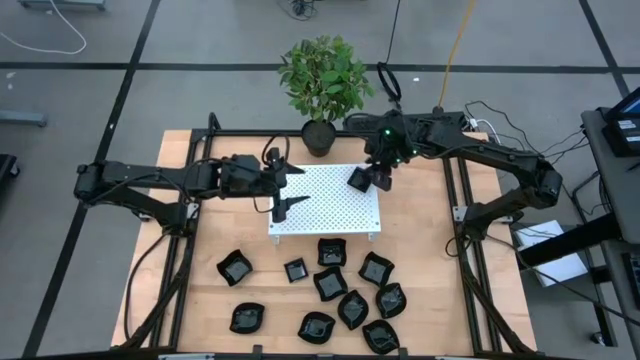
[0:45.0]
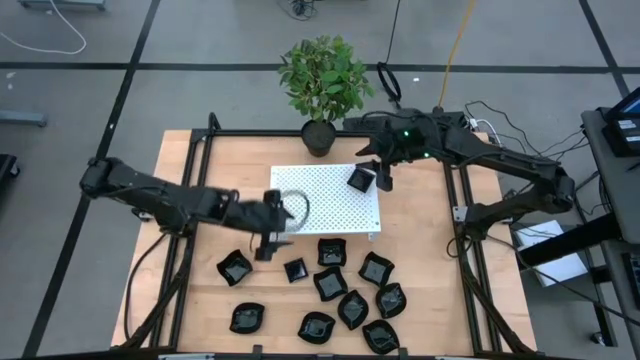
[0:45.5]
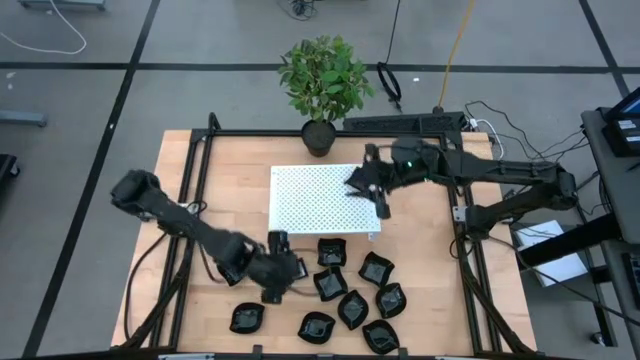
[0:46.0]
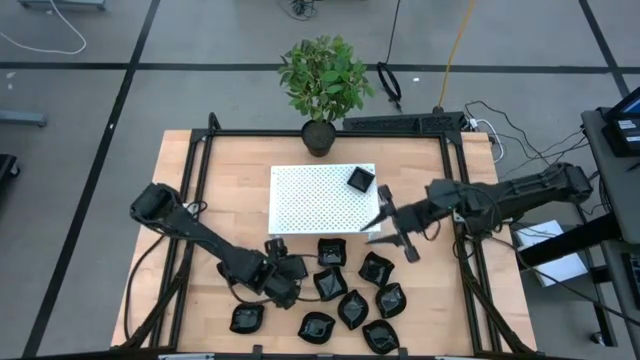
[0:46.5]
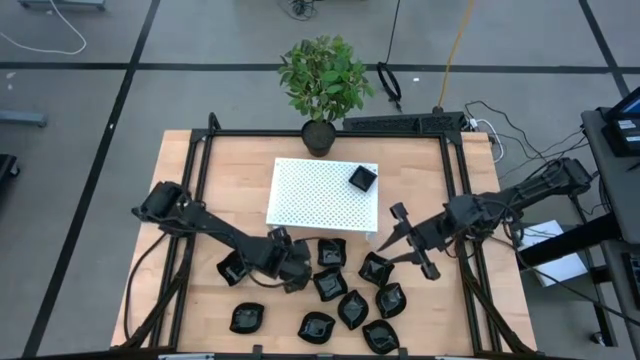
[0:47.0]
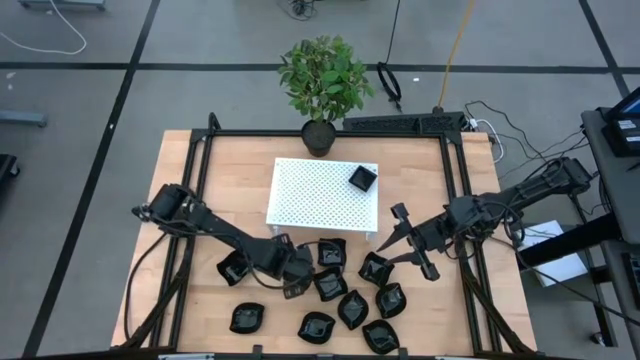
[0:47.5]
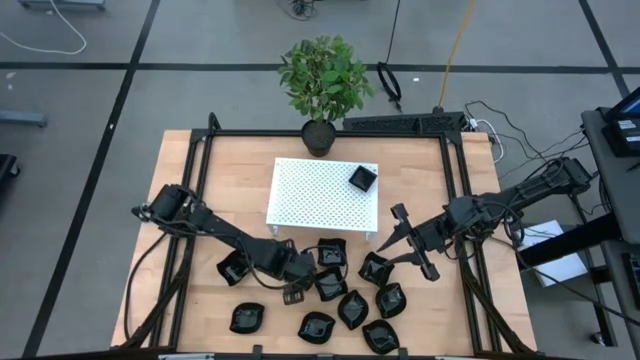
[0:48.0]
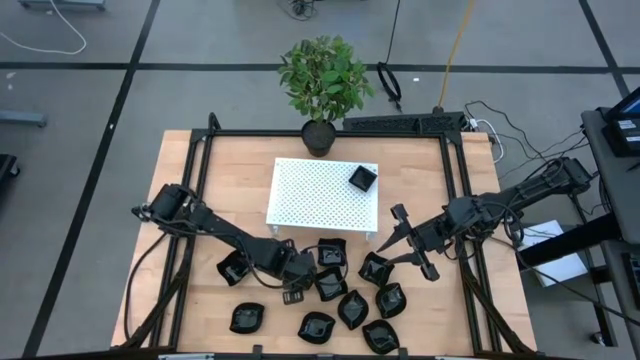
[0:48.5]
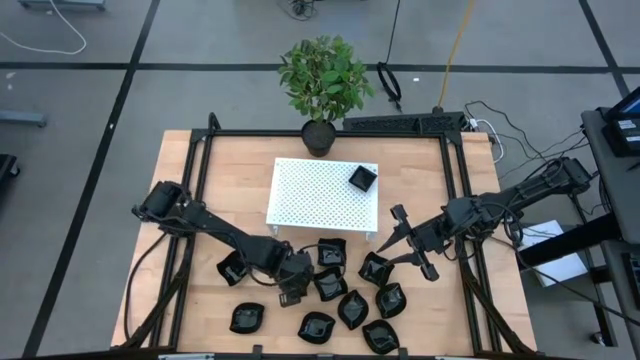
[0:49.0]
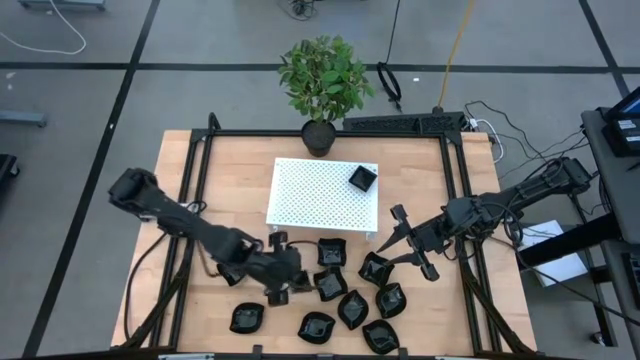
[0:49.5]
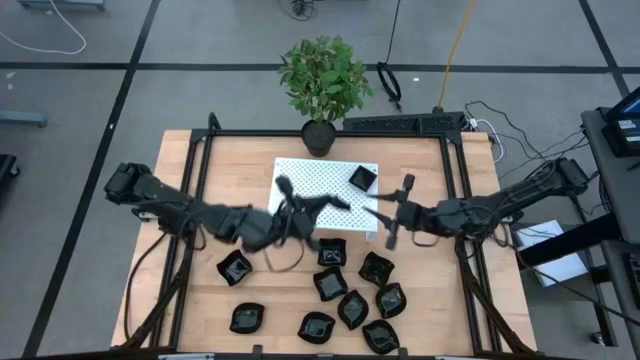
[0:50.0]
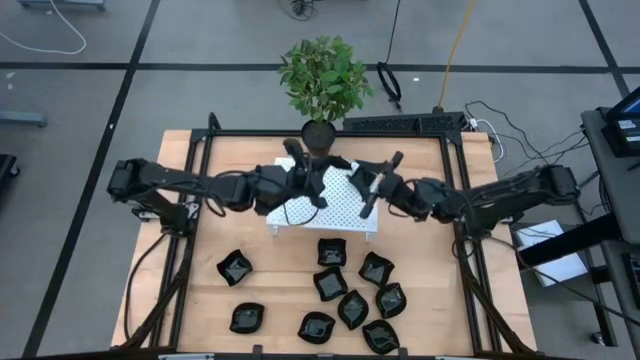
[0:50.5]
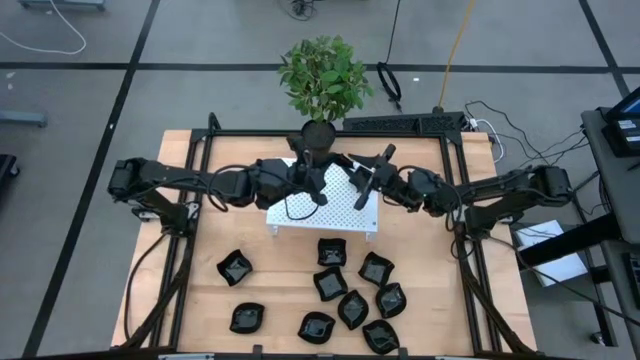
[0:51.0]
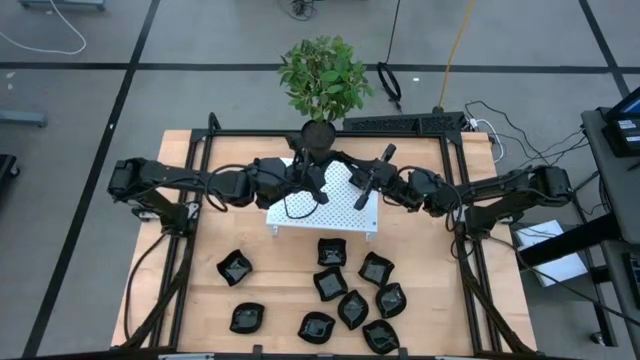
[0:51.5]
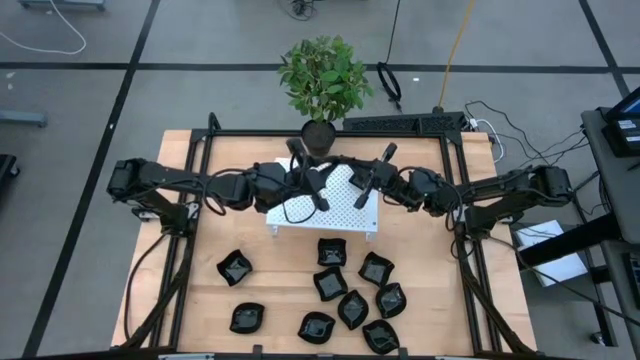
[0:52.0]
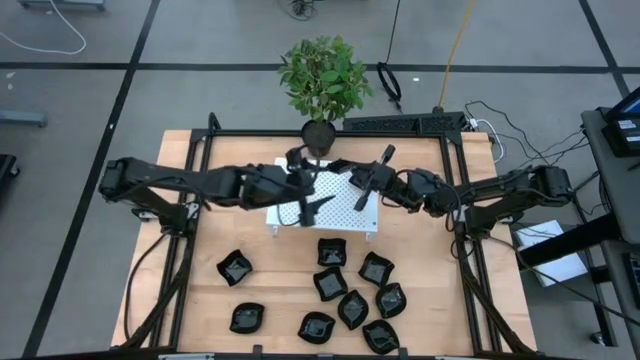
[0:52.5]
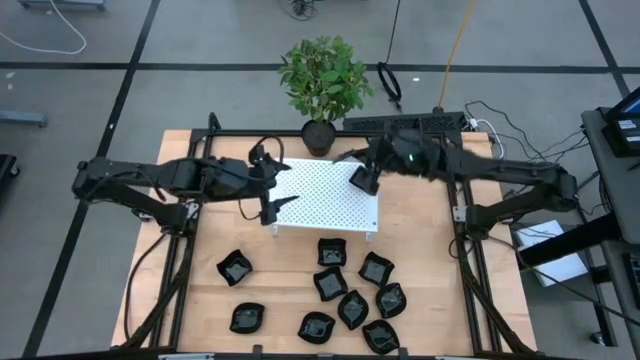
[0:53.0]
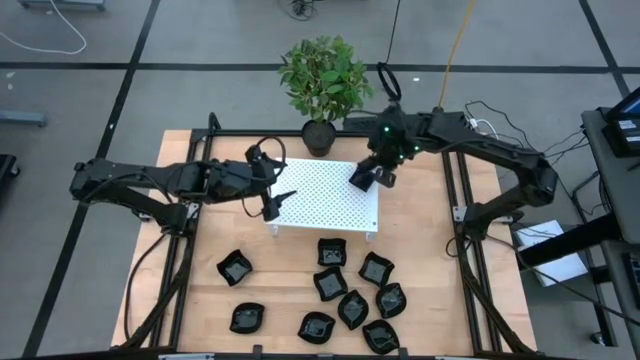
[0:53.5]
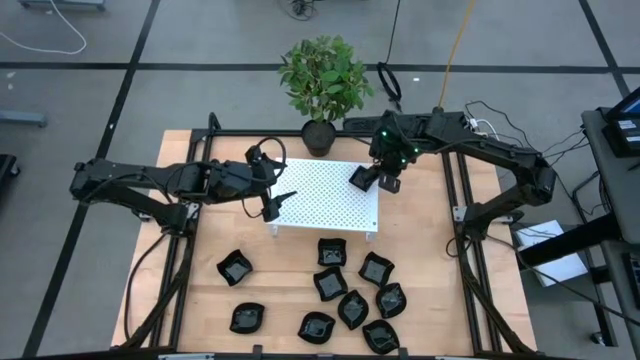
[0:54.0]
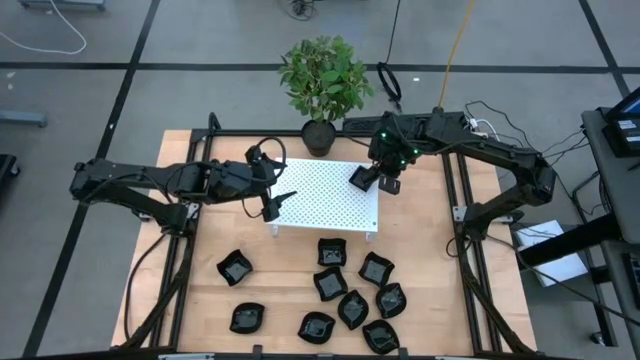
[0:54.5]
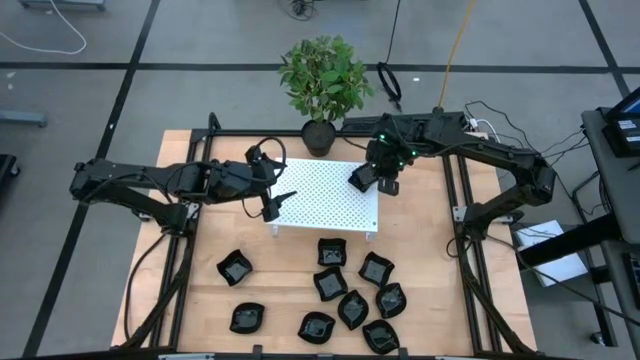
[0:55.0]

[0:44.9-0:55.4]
Task: Pick & Place Mini shaped plates
Stack the black square plate on top of the black square plate on the shelf

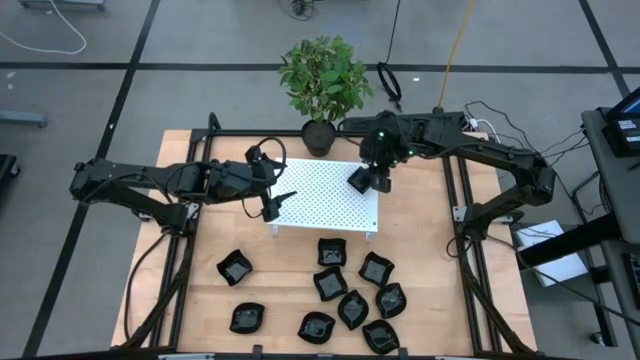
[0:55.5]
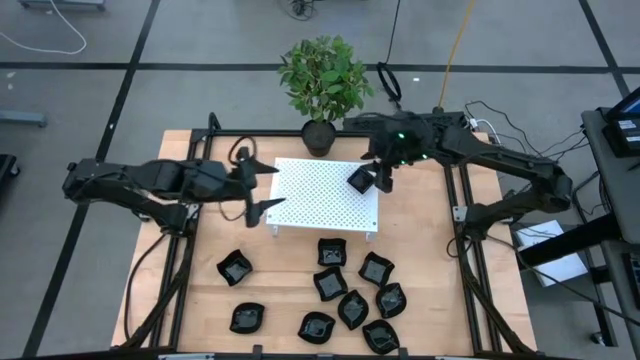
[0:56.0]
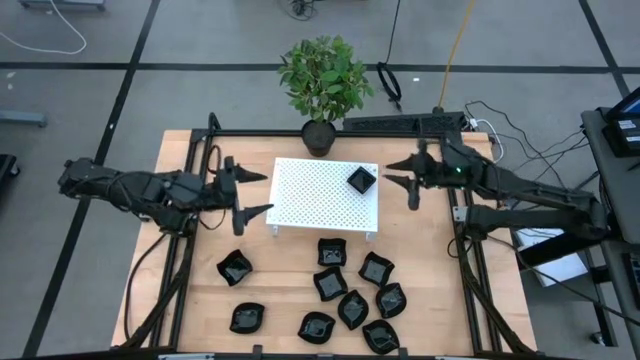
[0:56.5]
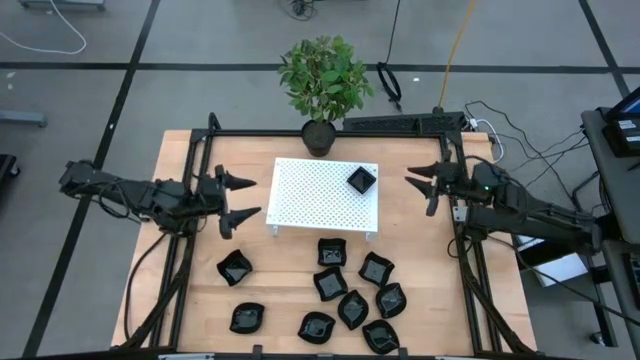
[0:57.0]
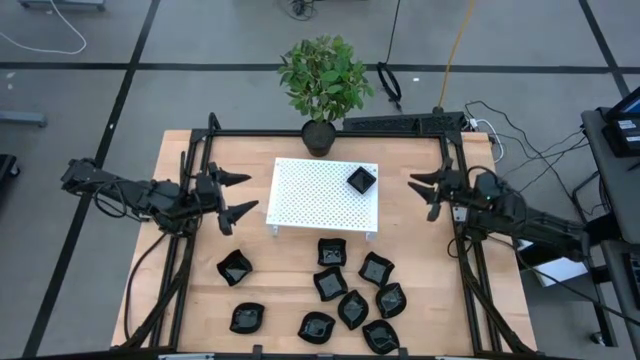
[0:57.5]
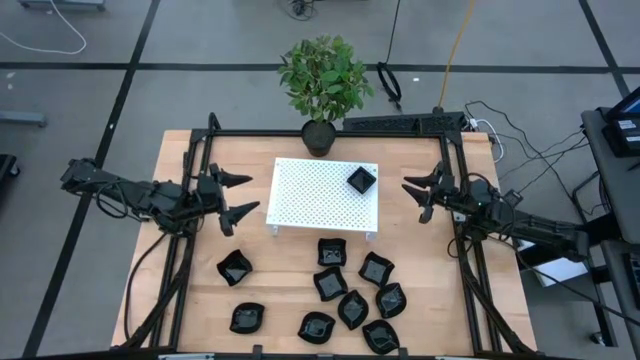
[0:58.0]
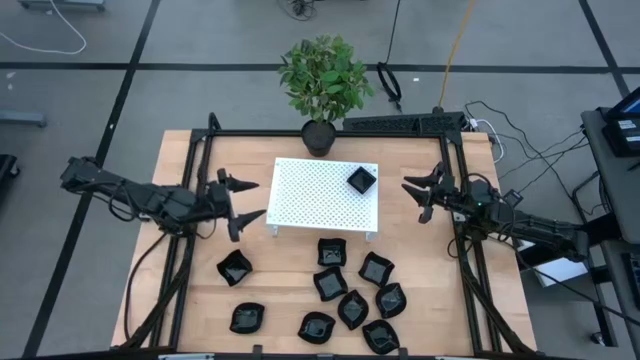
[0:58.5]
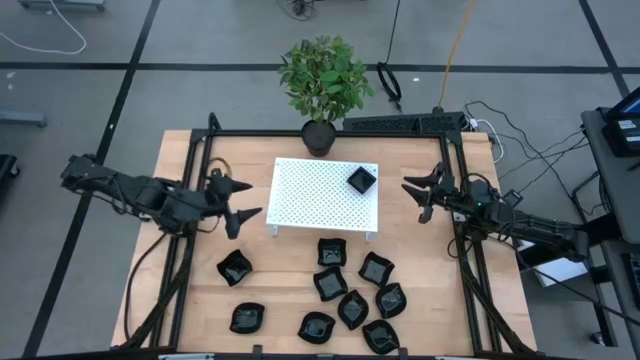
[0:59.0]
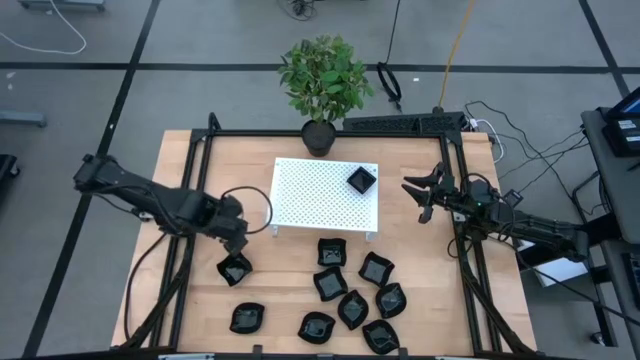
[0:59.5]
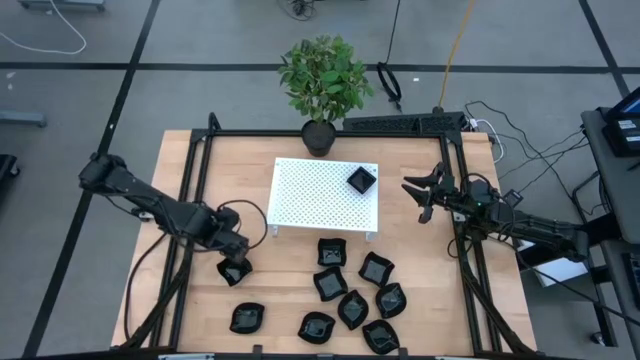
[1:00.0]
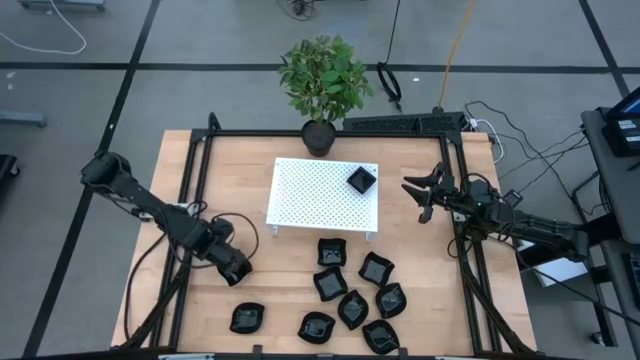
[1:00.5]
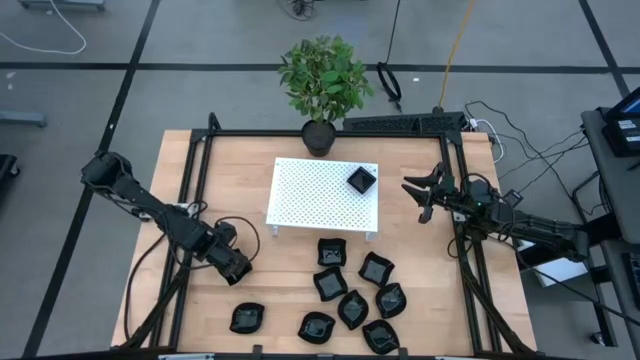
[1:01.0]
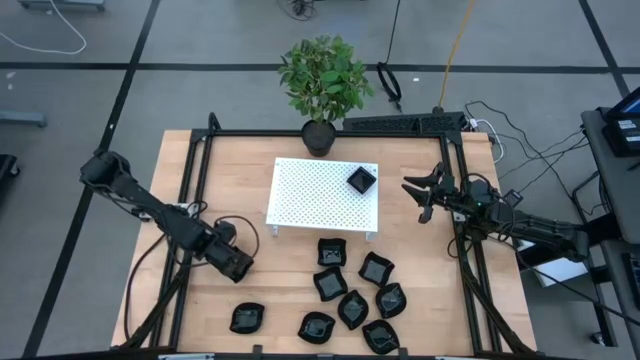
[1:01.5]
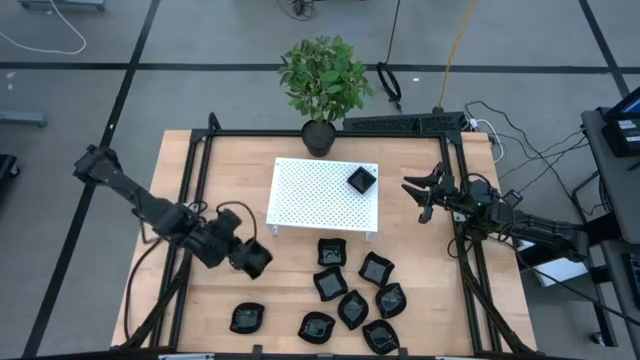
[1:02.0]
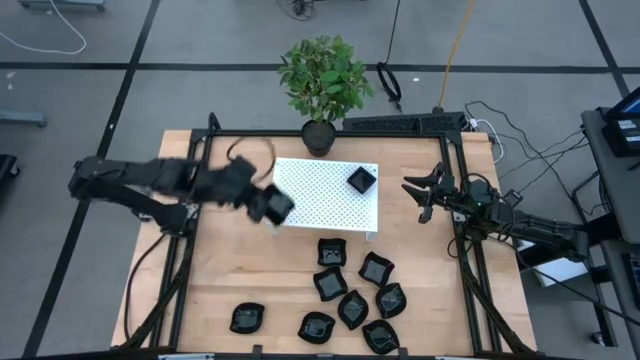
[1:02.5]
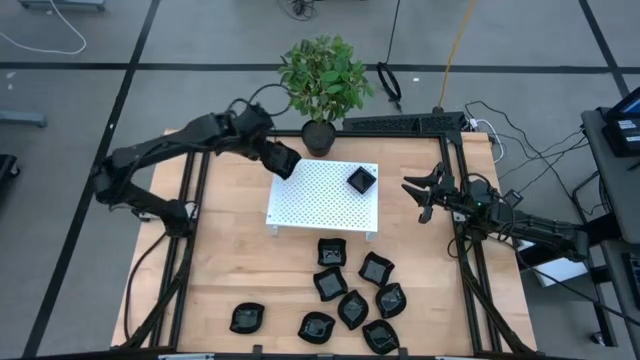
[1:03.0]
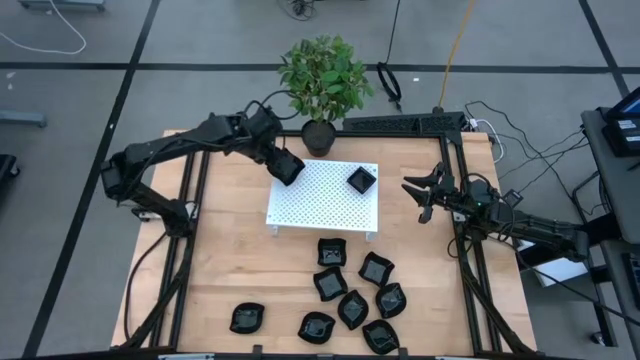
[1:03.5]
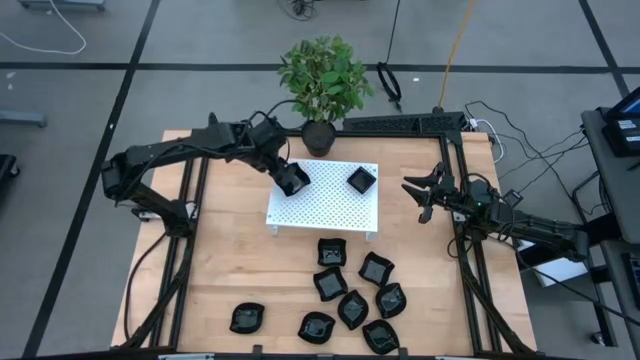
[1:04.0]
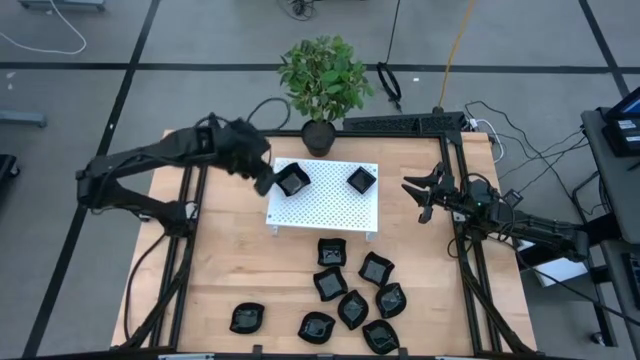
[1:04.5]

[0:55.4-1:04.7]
Put the black distorted square plate on the shelf

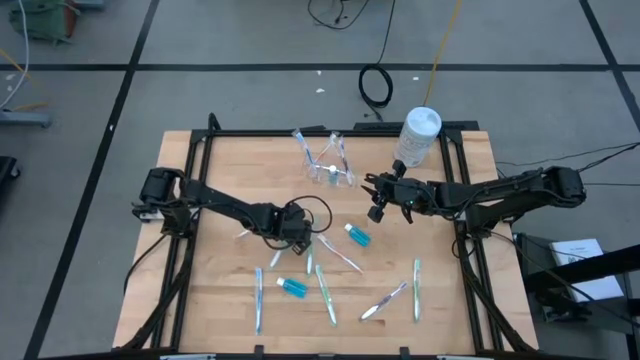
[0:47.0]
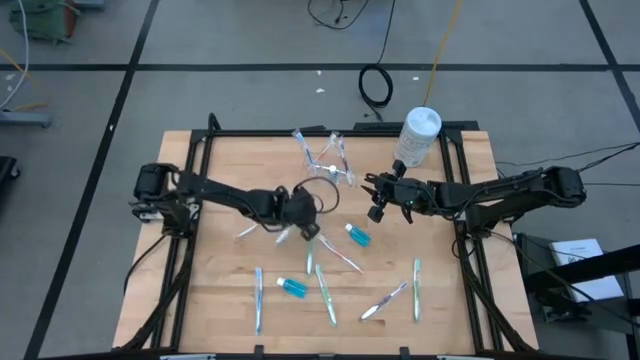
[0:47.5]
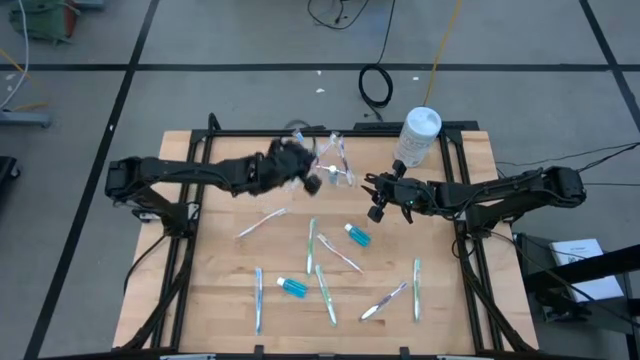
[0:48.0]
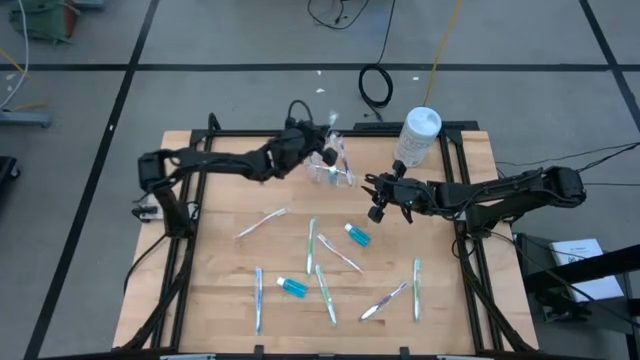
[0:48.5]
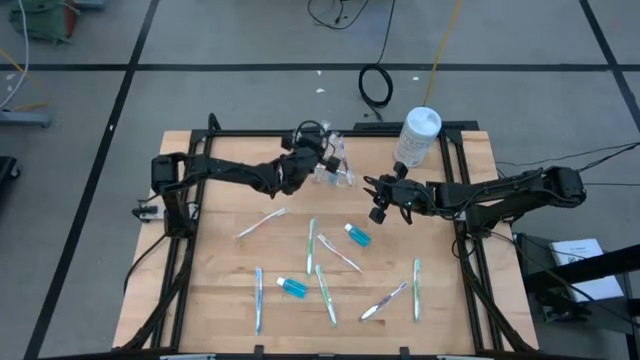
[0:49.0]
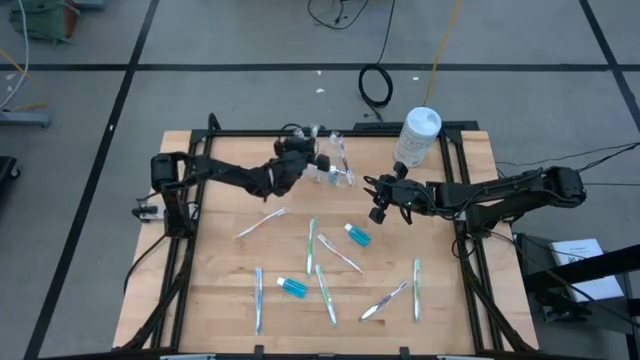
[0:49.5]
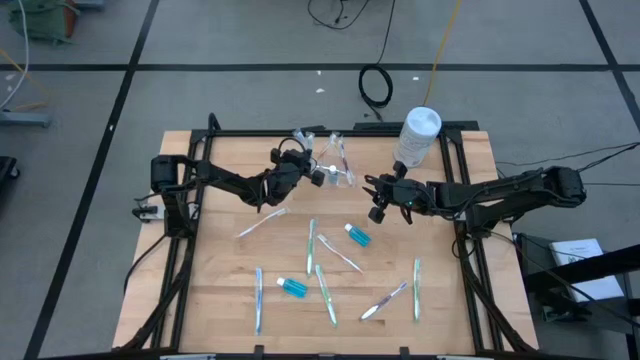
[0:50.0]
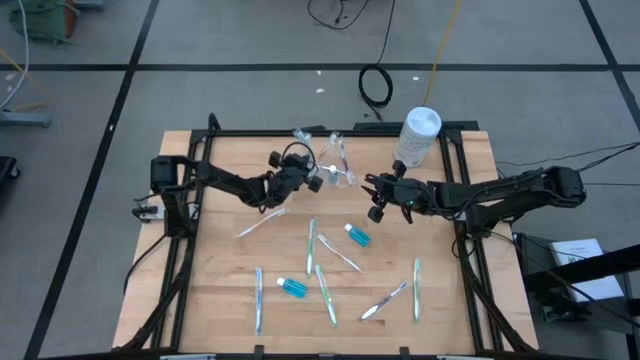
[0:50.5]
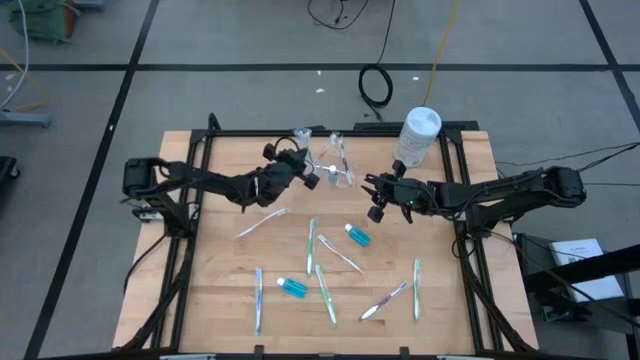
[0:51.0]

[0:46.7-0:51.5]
Task: Pick & Place toothbrushing station
Put the green toothbrush into the transparent organizer
